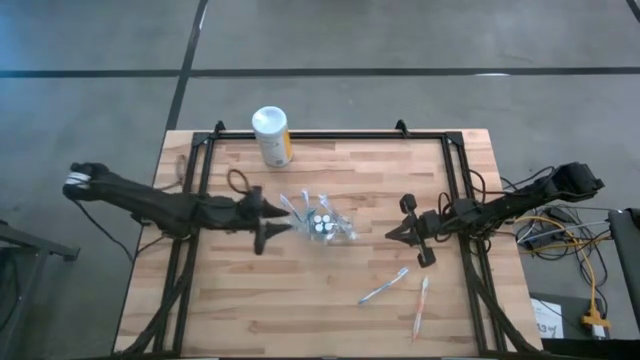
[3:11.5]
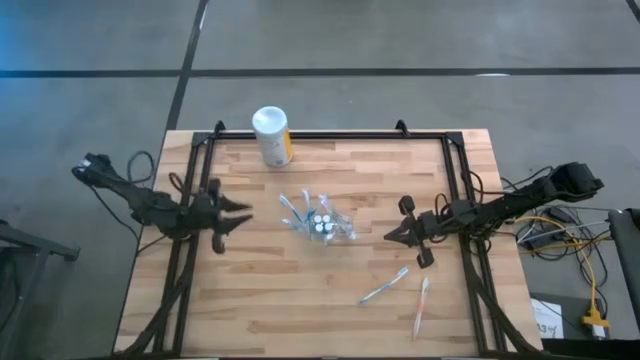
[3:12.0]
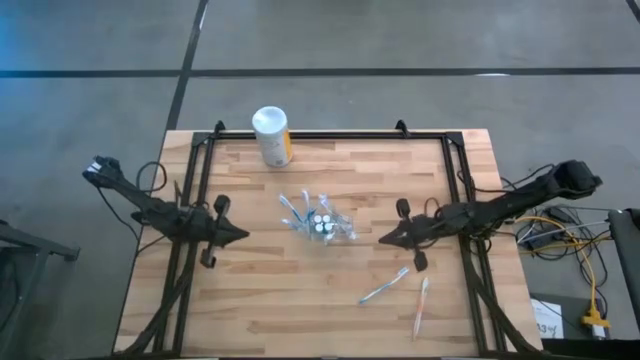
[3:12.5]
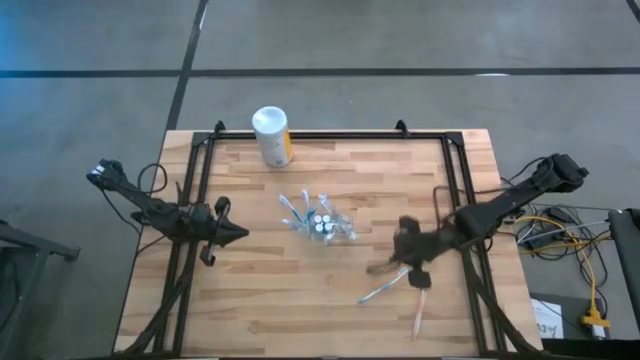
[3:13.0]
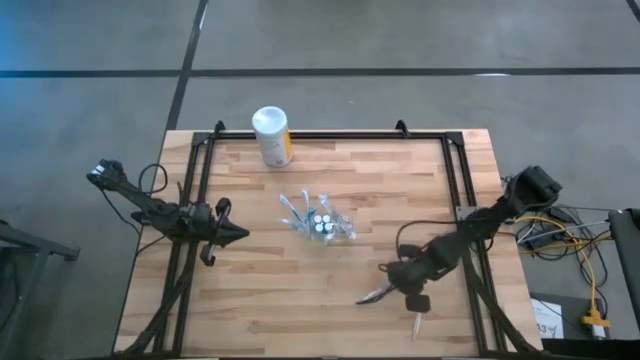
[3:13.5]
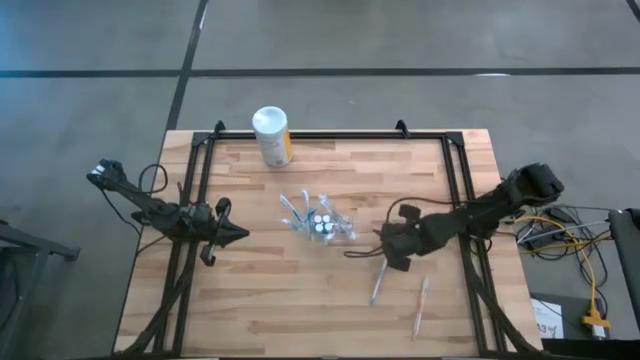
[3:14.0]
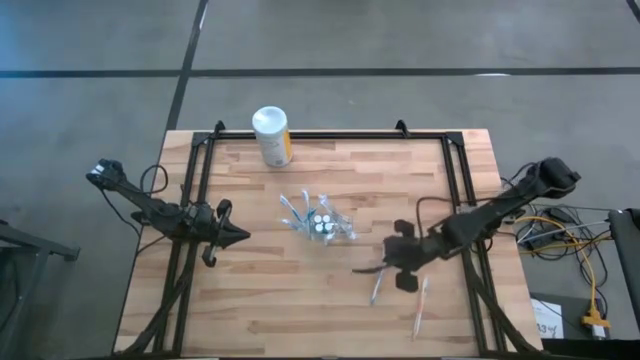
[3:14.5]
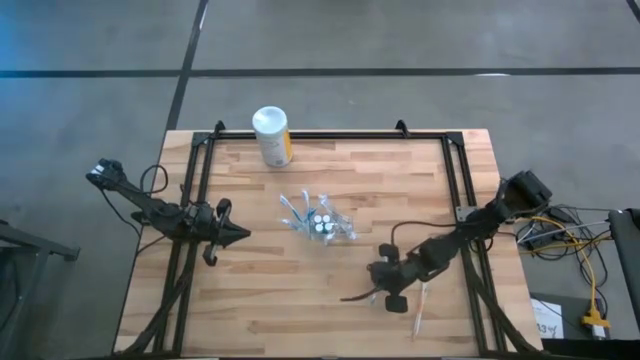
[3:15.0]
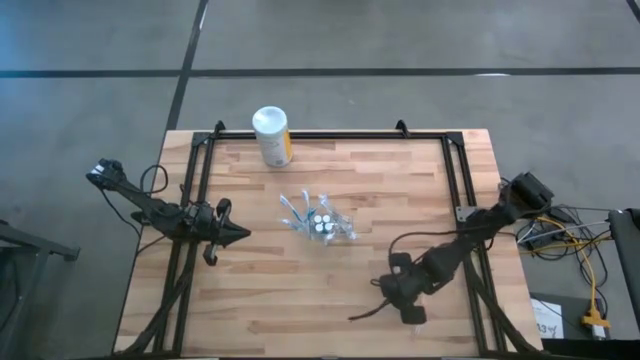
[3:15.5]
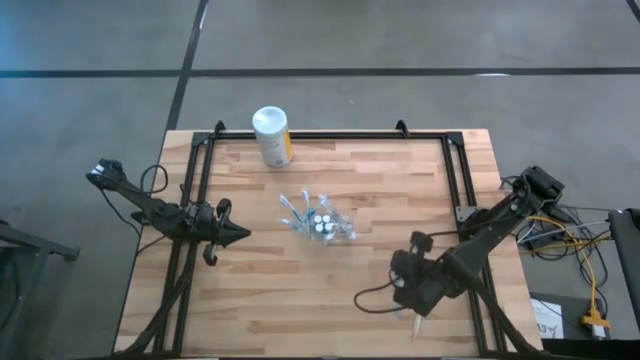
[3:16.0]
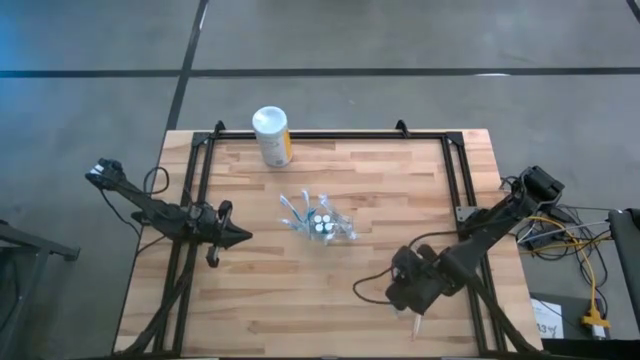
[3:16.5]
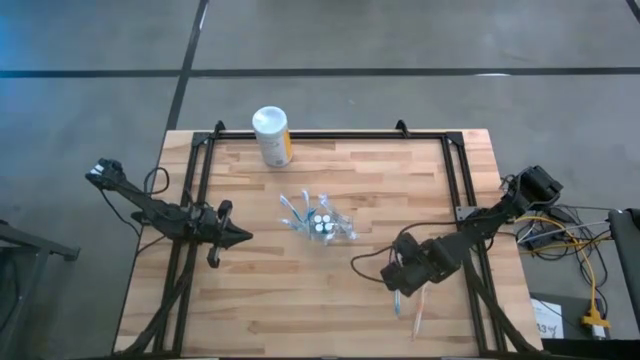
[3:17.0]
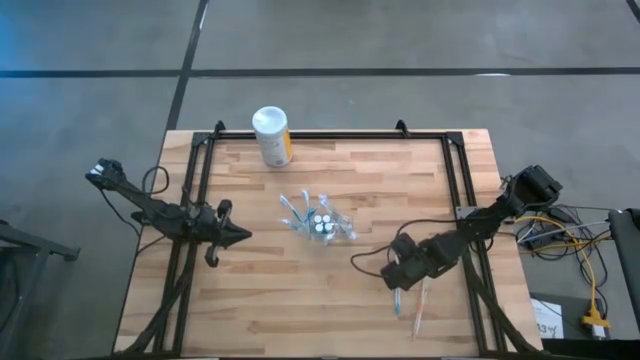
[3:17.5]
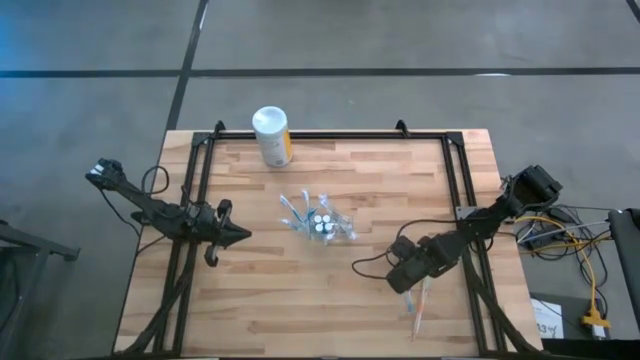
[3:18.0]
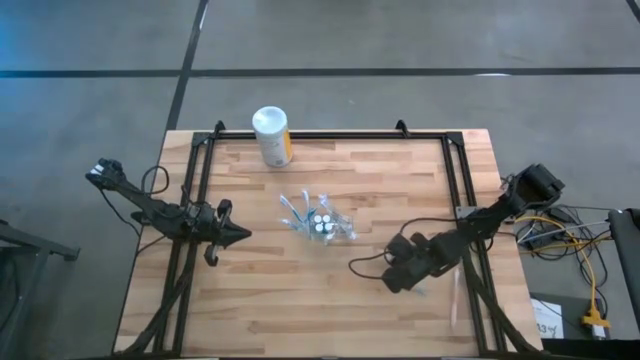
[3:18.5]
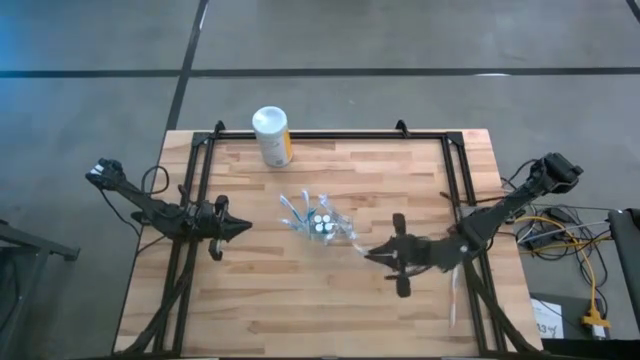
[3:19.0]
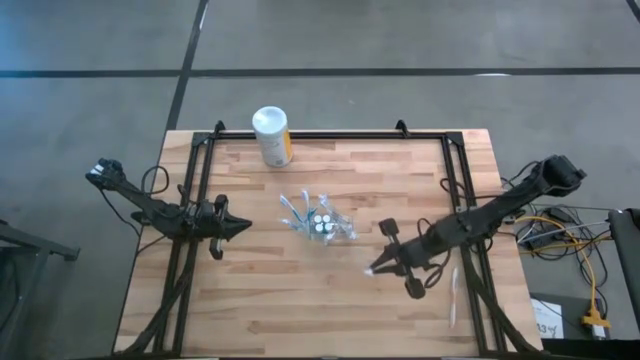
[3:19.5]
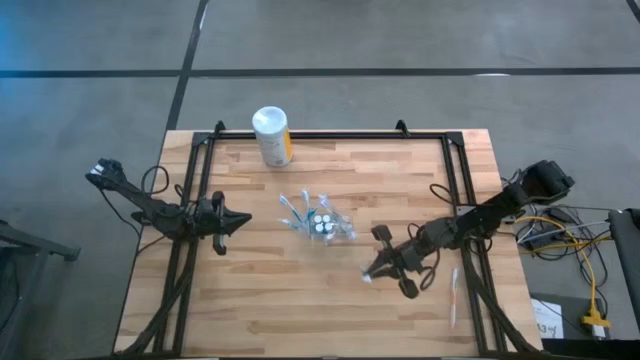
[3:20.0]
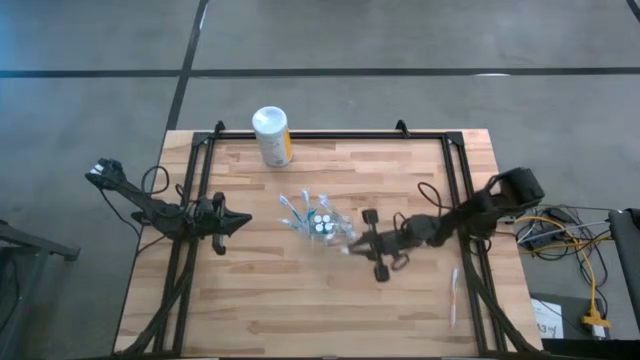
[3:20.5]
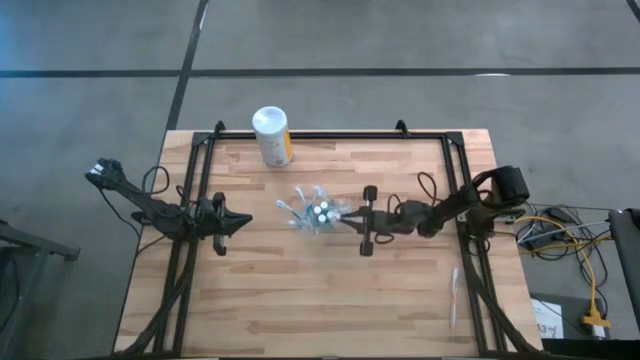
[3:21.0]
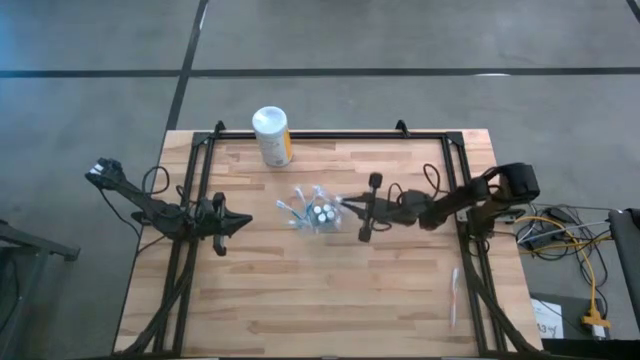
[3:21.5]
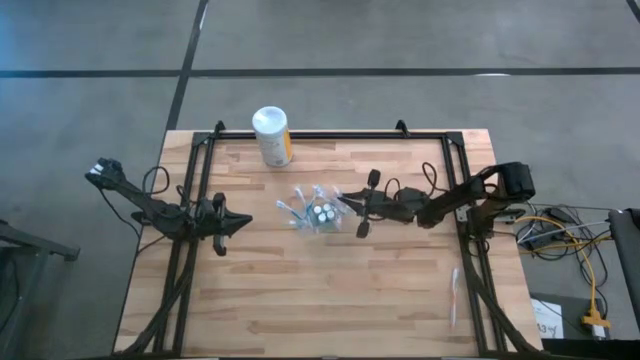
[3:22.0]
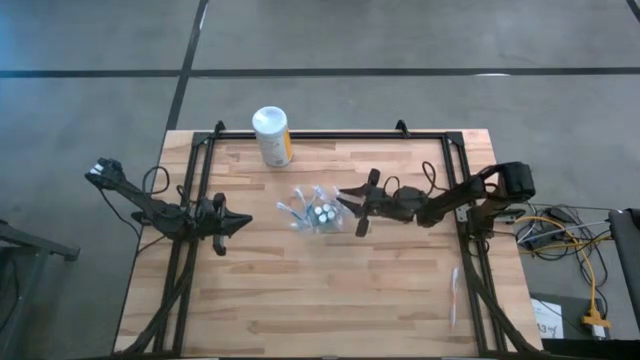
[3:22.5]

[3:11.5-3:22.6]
Task: Pick & Place toothbrushing station
Put the blue toothbrush into the transparent organizer

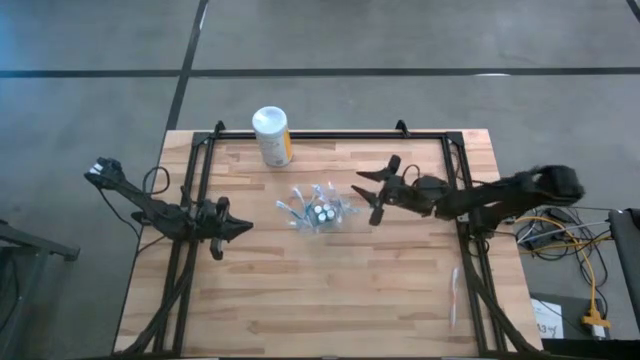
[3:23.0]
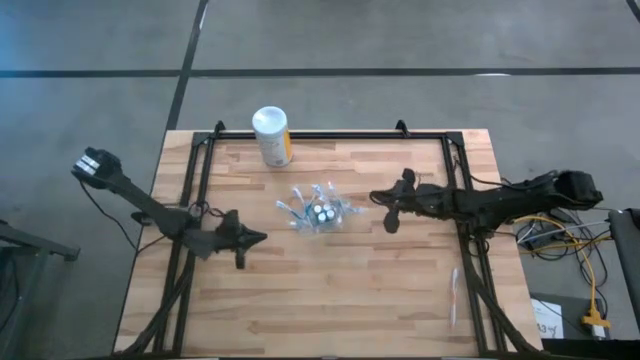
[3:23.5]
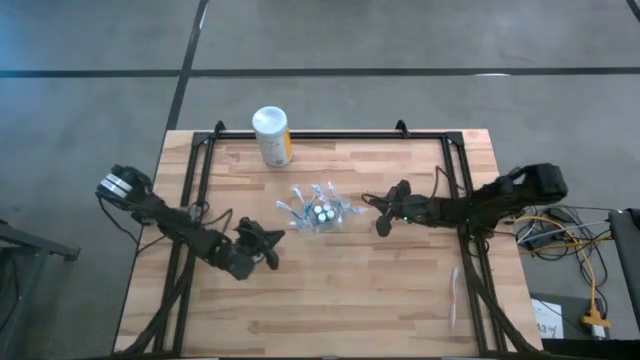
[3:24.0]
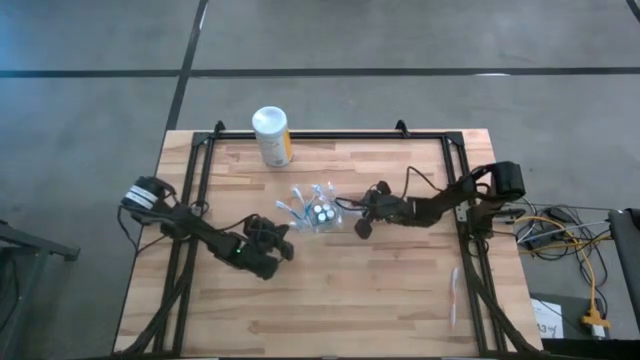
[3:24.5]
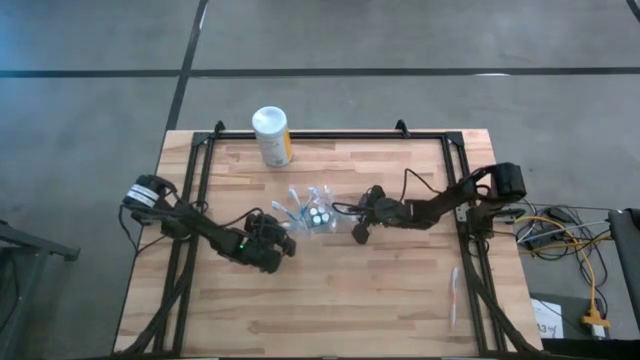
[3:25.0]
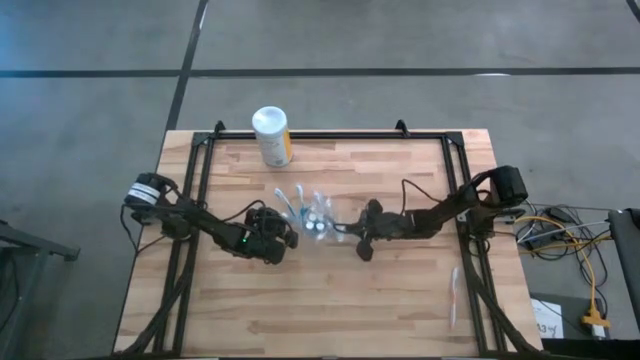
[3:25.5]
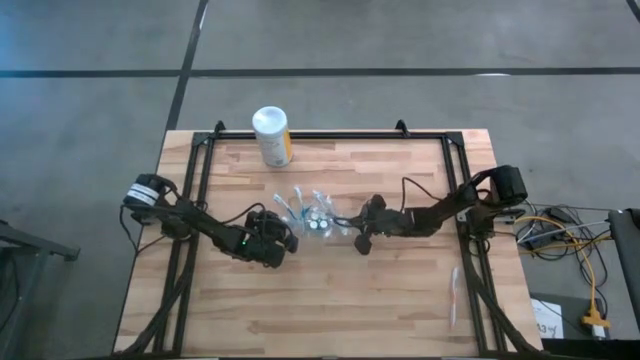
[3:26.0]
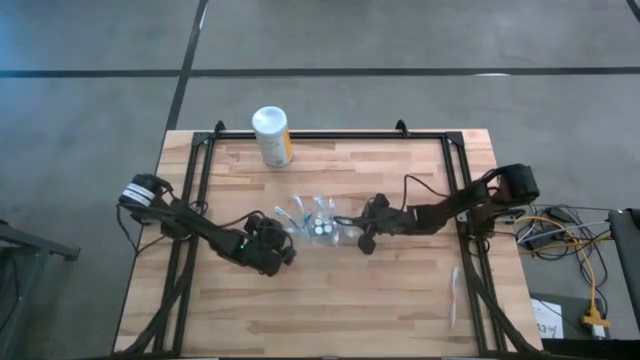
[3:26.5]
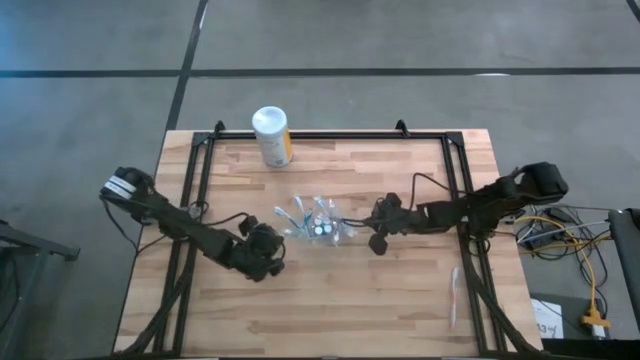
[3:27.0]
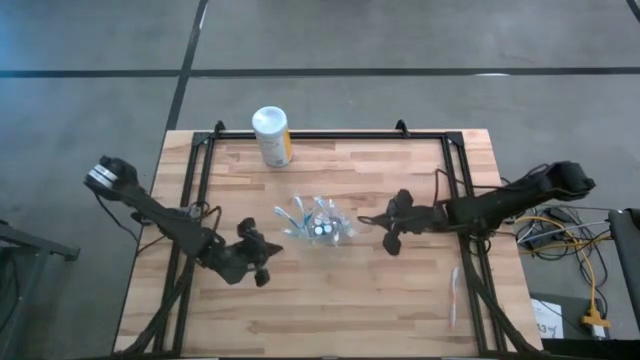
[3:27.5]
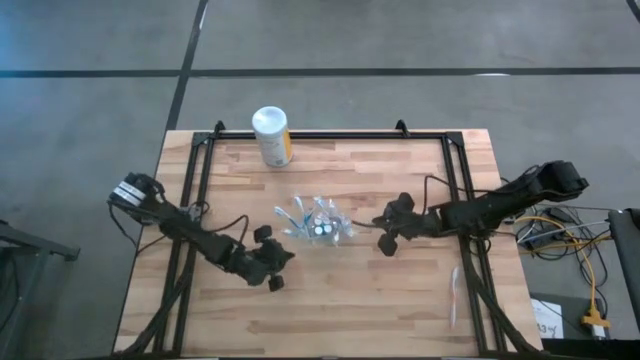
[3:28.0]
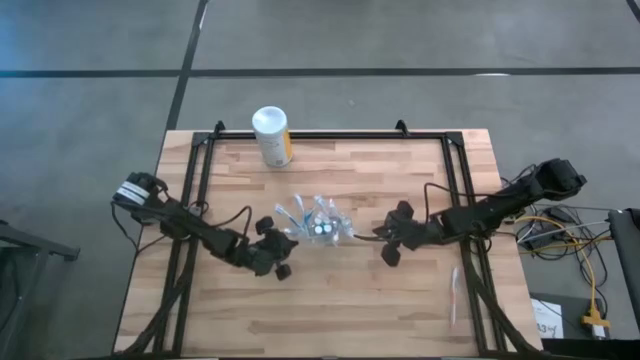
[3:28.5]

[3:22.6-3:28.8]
Adjust the transparent organizer

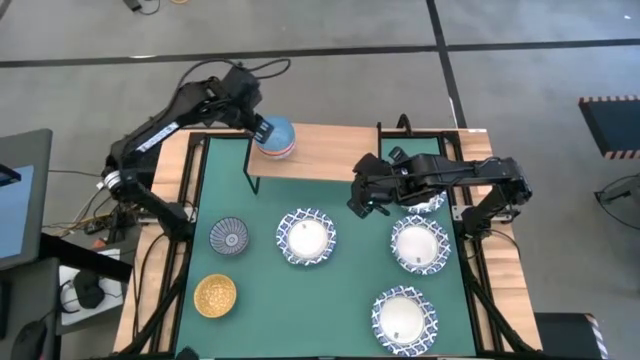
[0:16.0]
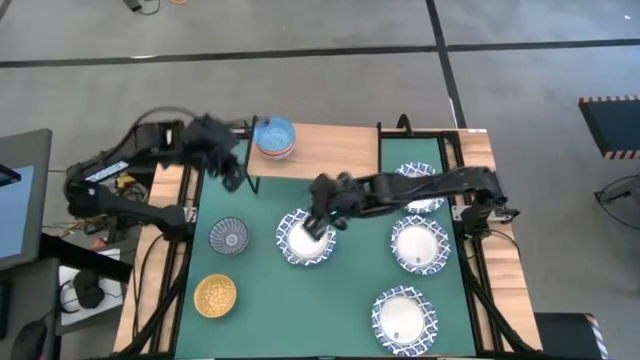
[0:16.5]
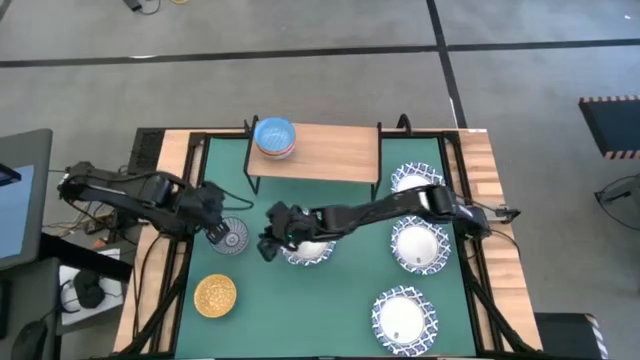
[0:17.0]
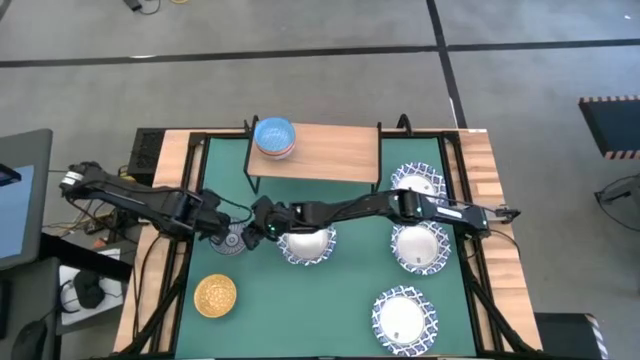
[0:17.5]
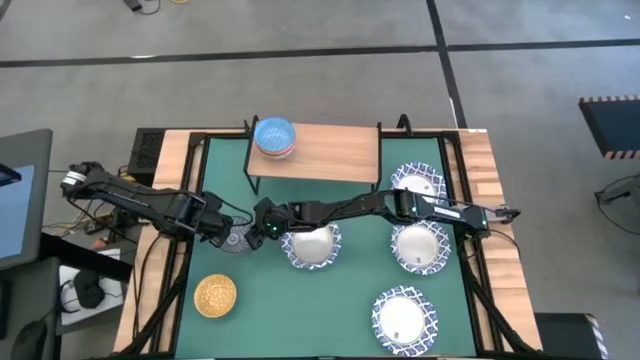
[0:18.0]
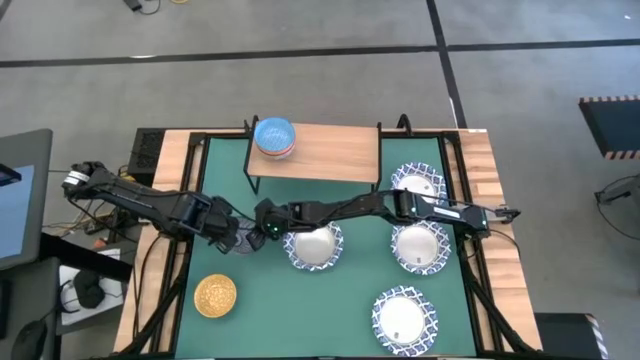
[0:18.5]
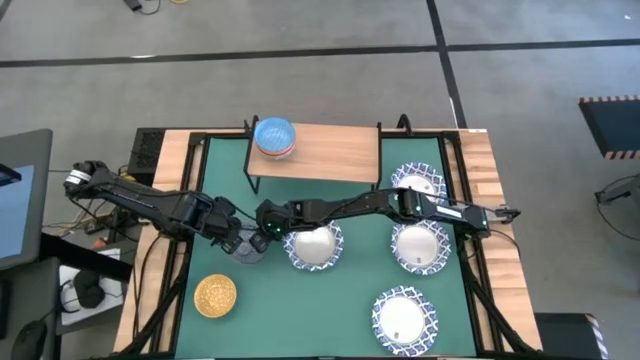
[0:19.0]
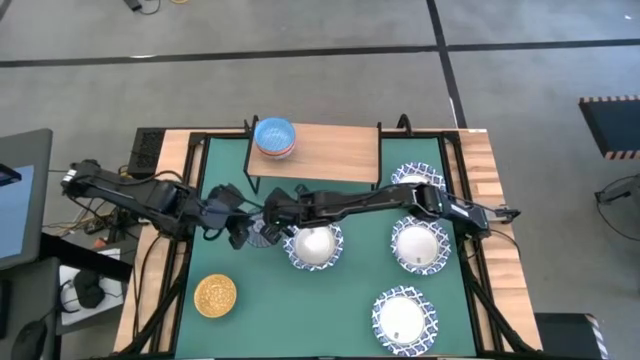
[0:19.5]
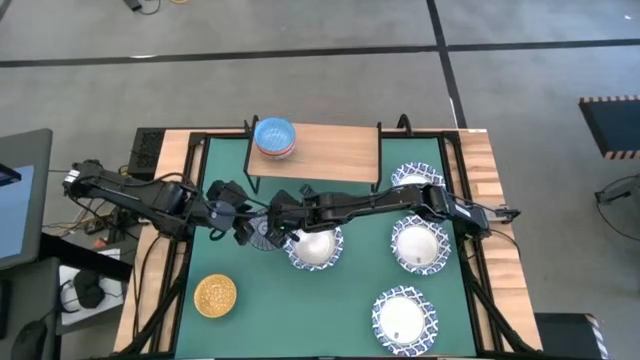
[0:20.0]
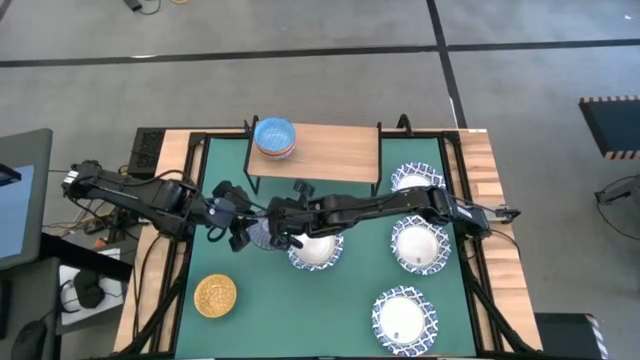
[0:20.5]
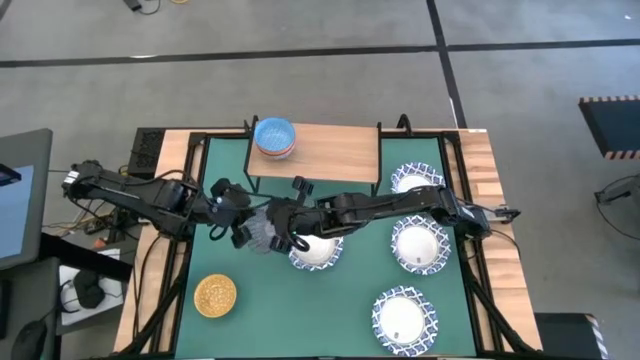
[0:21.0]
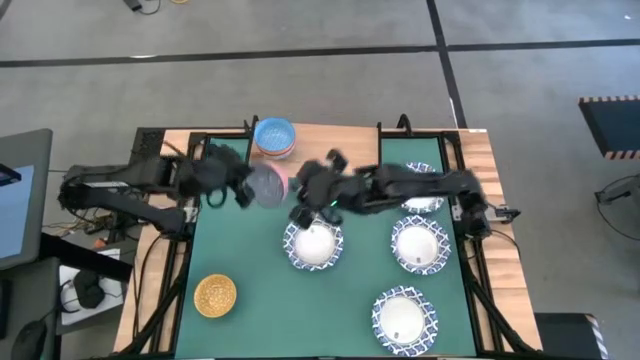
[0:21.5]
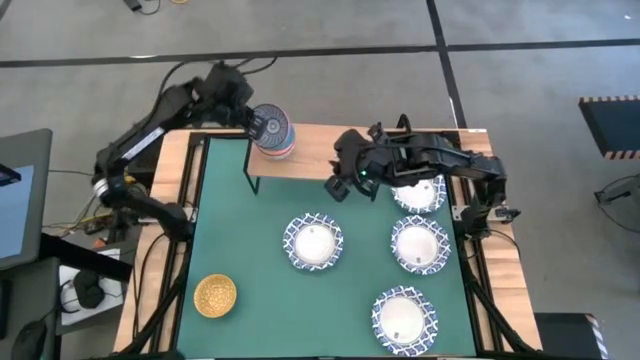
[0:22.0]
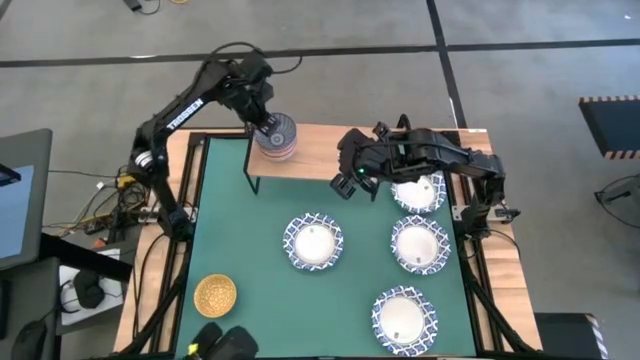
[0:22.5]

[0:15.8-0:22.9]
Task: Place and stack bowls onto a shelf
Stack the blue patterned bowl on top of the light blue patterned bowl on the shelf
